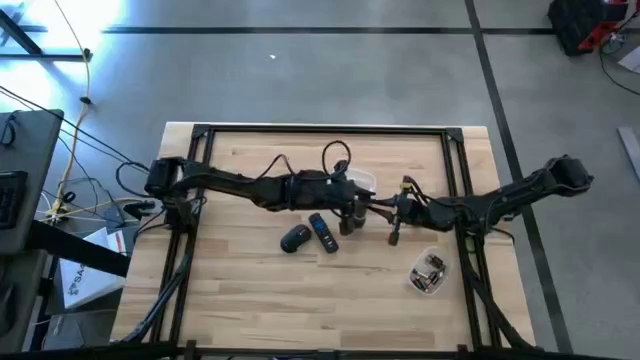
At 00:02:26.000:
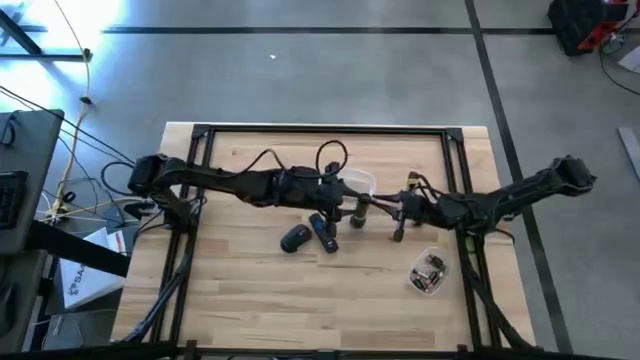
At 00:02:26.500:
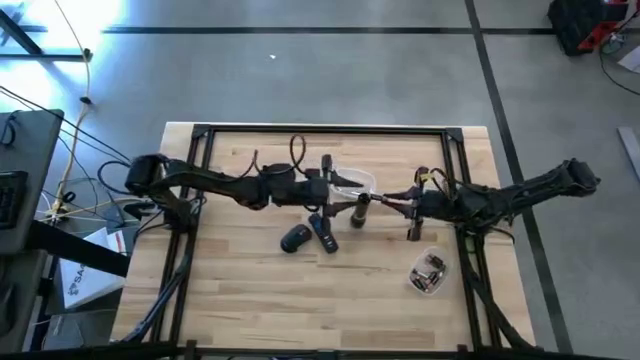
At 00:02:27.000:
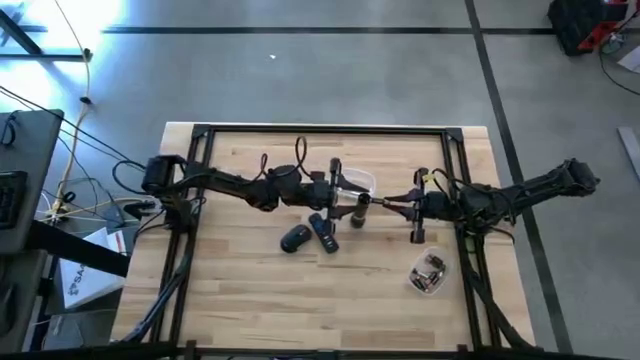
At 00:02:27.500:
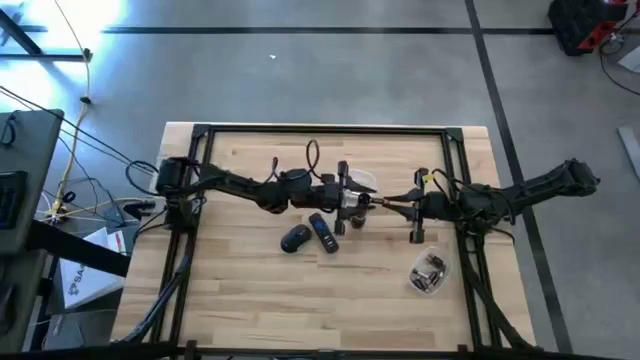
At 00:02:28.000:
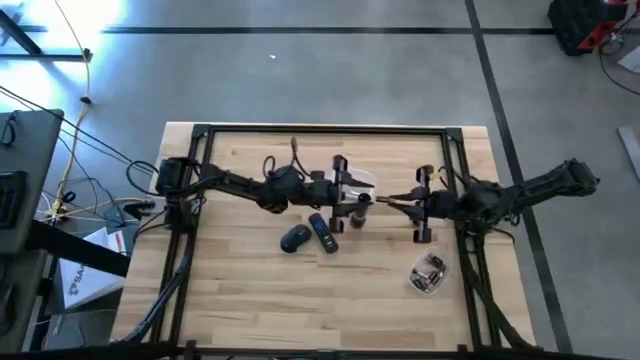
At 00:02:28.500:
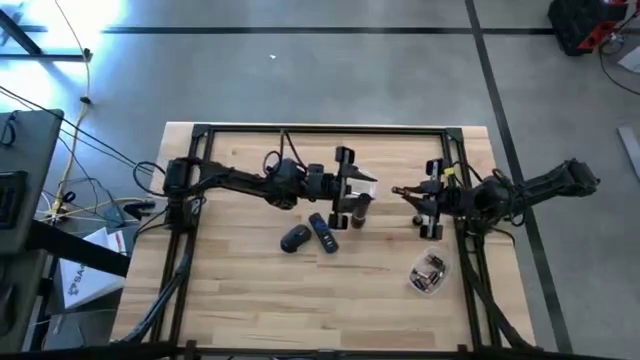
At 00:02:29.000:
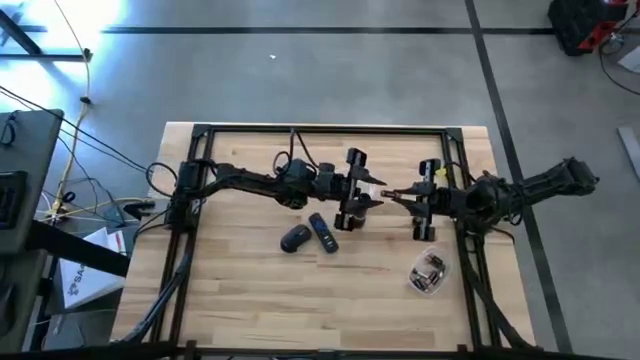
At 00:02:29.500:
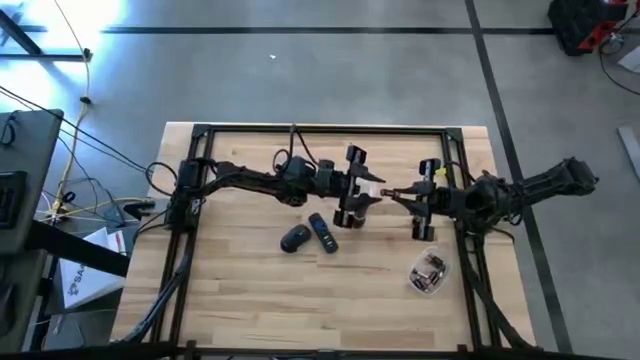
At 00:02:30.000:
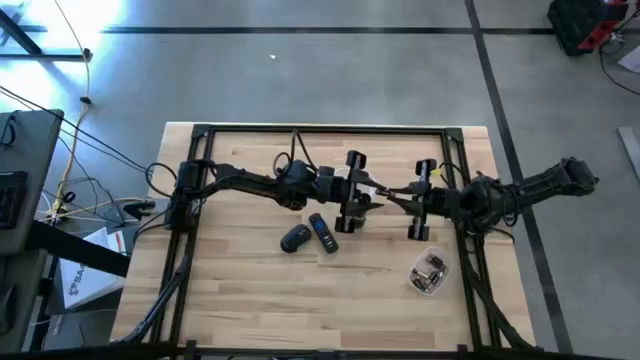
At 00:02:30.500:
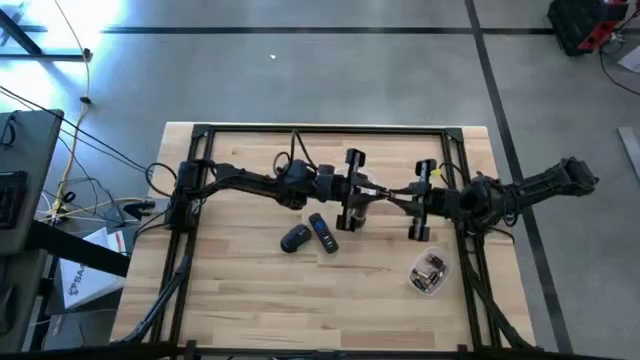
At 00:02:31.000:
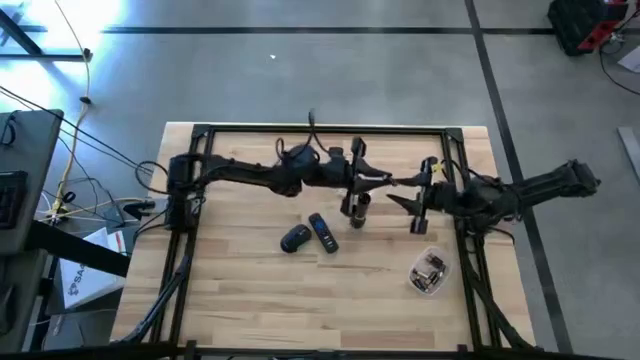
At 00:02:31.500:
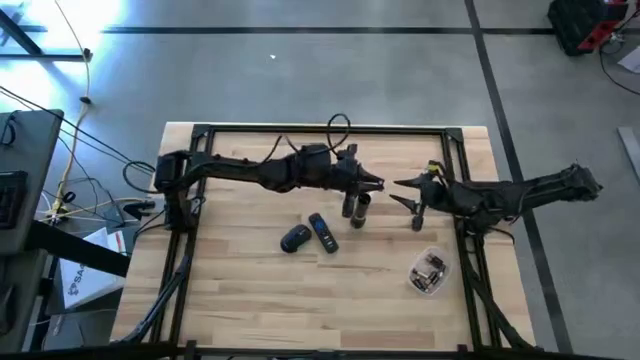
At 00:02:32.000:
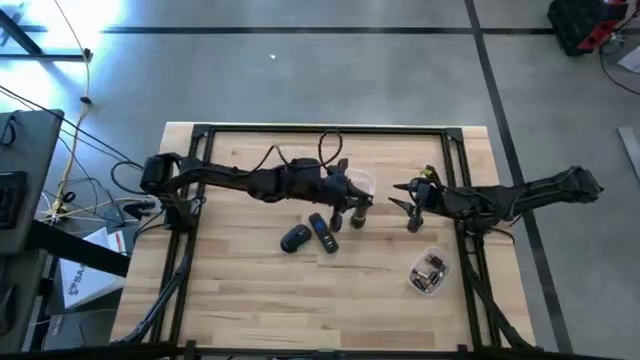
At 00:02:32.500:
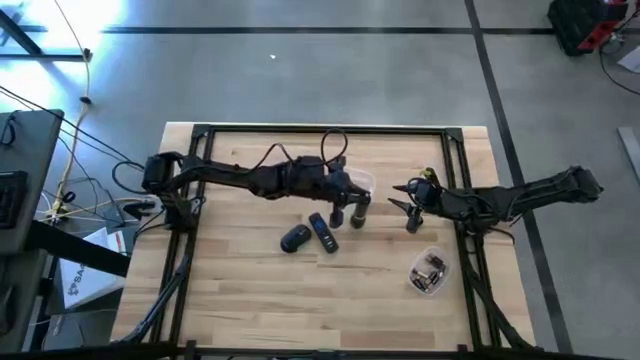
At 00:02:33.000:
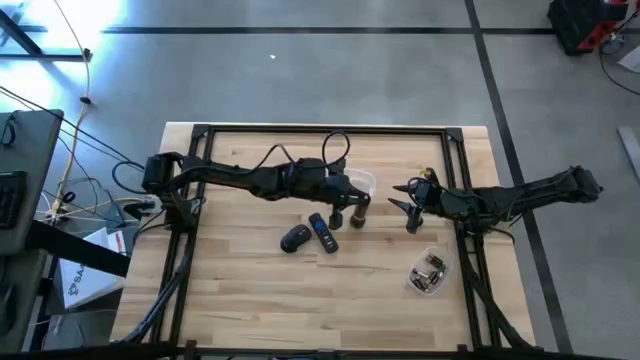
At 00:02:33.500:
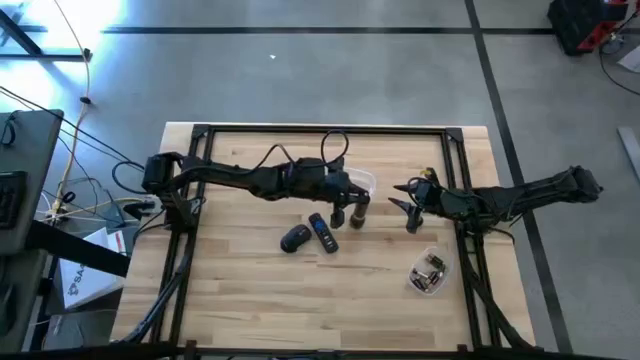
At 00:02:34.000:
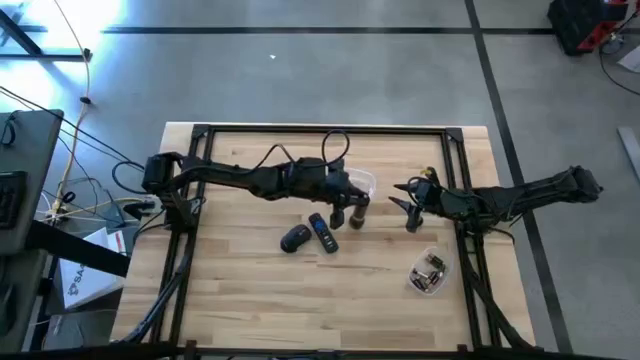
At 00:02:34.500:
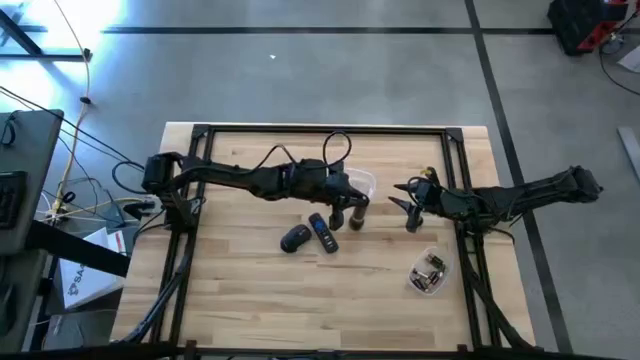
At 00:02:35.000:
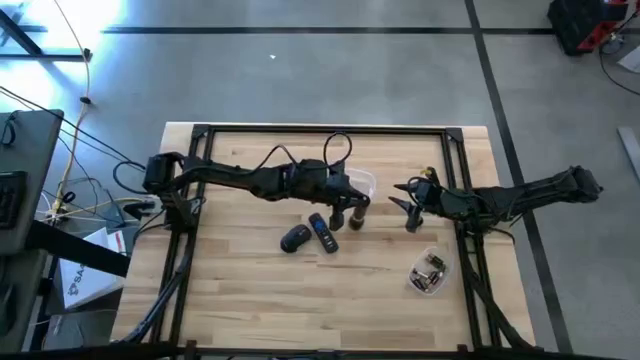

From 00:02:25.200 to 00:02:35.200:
Task: Insert battery
Insert the black battery into the flashlight

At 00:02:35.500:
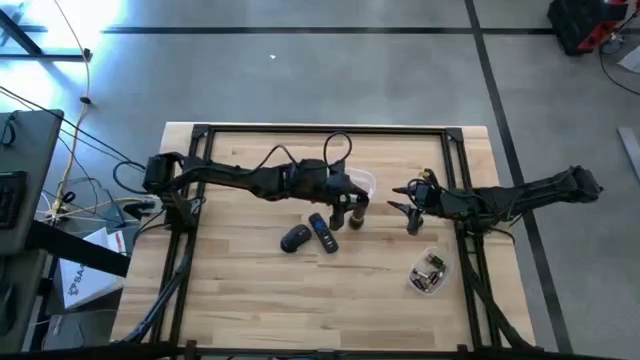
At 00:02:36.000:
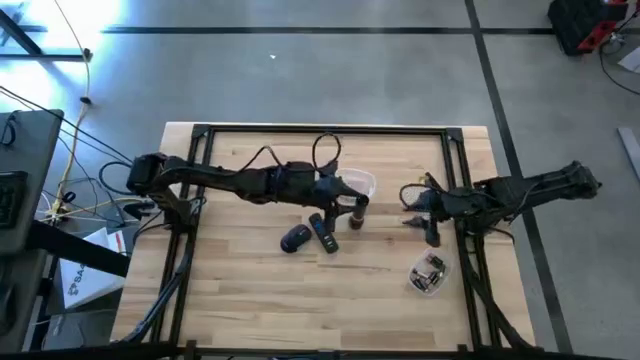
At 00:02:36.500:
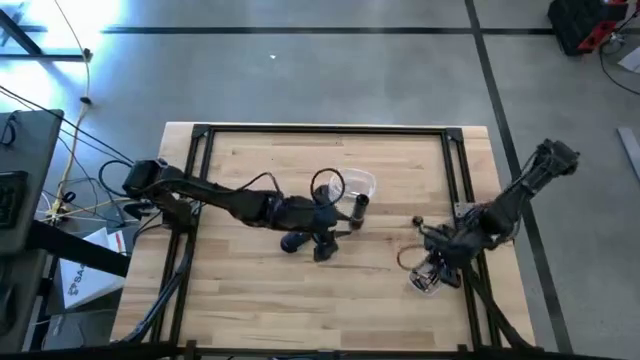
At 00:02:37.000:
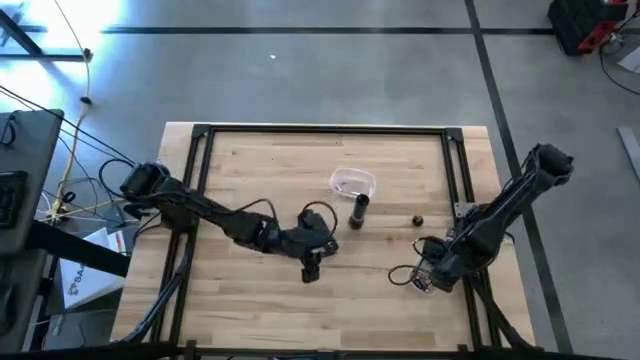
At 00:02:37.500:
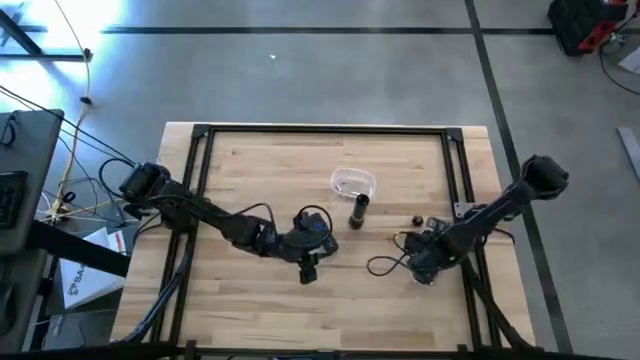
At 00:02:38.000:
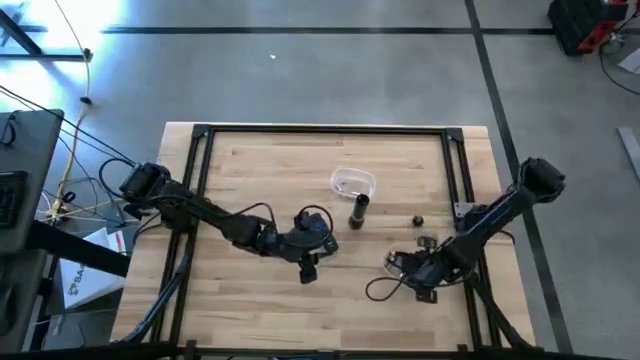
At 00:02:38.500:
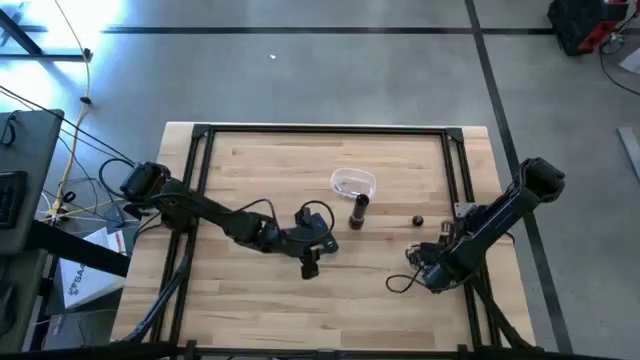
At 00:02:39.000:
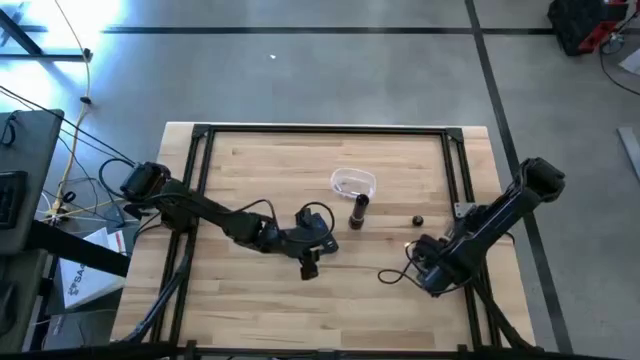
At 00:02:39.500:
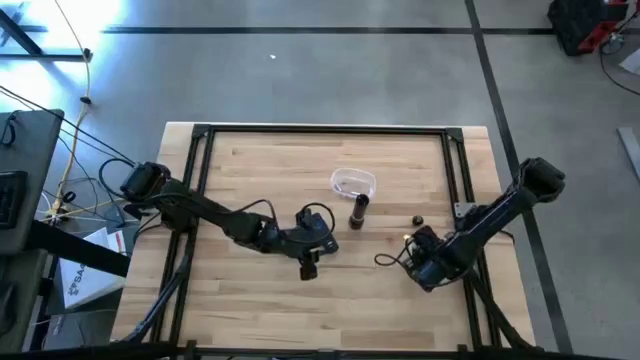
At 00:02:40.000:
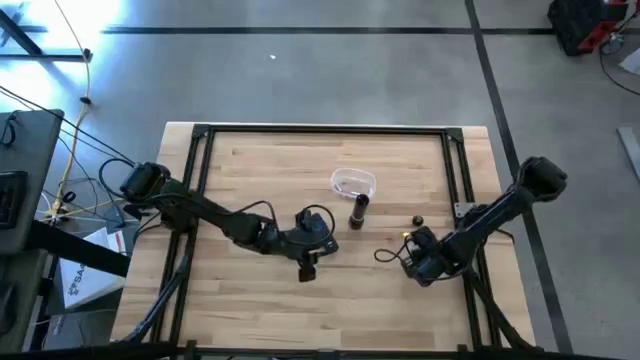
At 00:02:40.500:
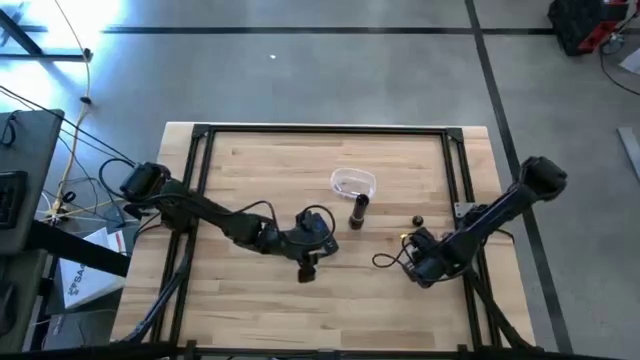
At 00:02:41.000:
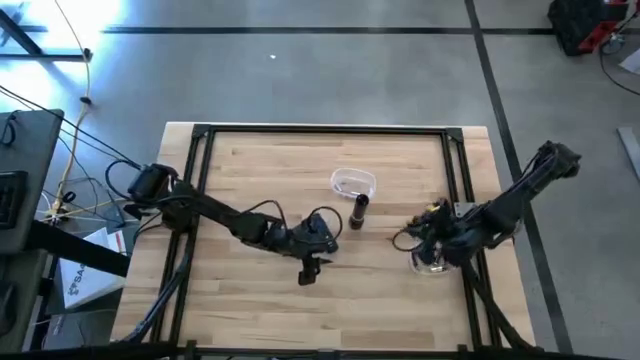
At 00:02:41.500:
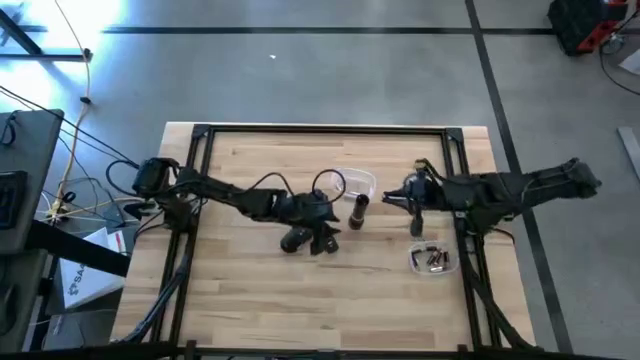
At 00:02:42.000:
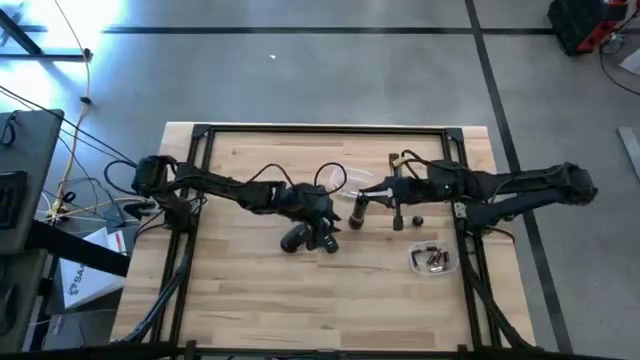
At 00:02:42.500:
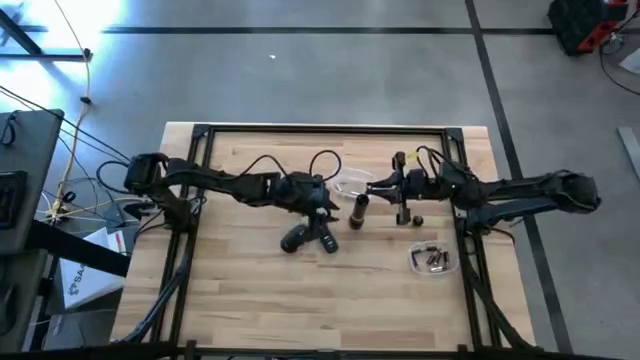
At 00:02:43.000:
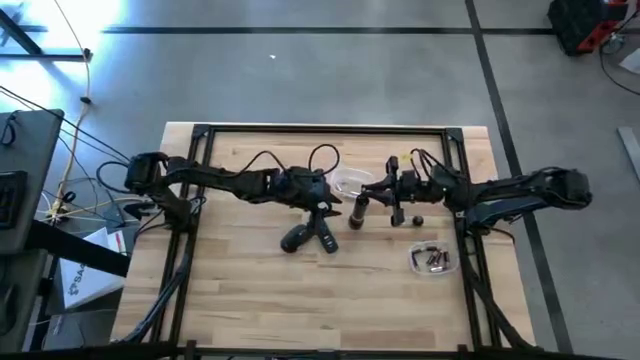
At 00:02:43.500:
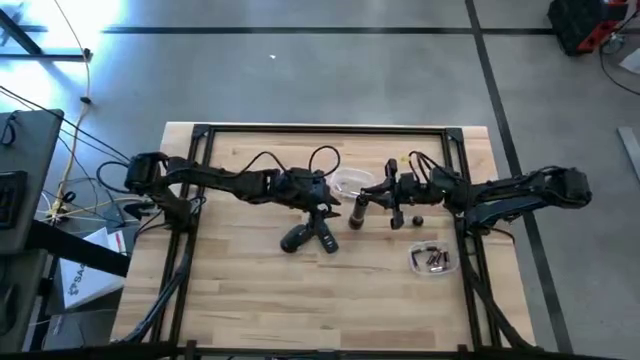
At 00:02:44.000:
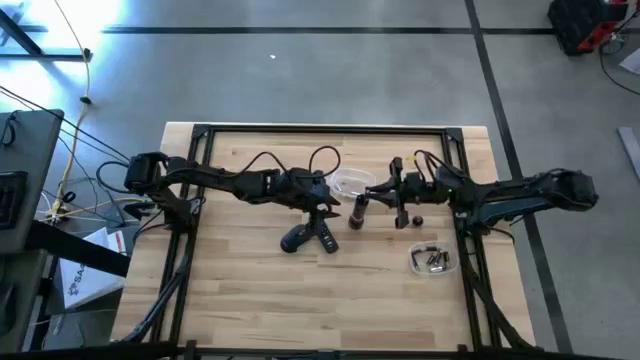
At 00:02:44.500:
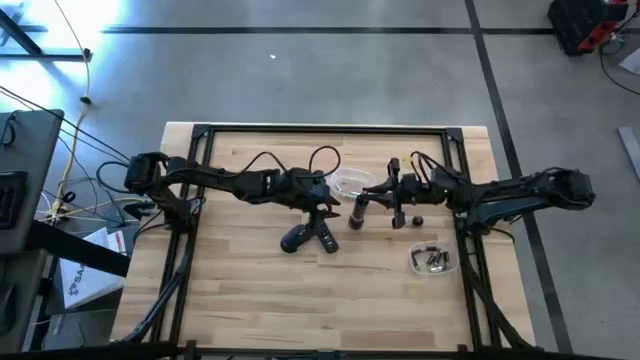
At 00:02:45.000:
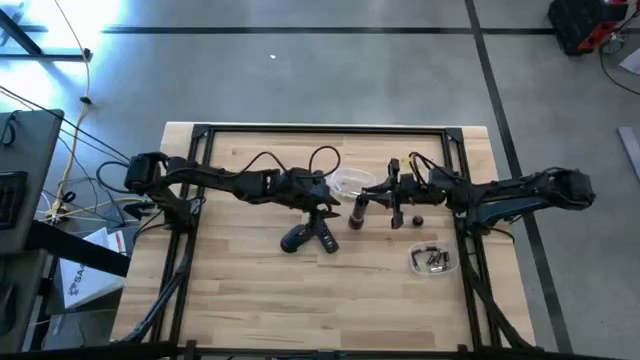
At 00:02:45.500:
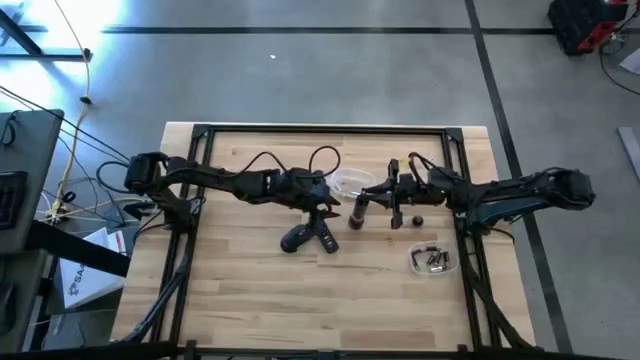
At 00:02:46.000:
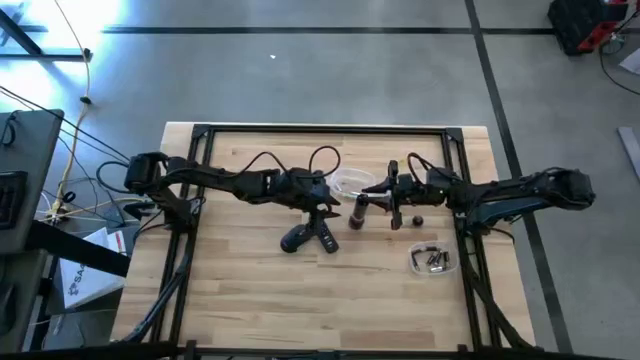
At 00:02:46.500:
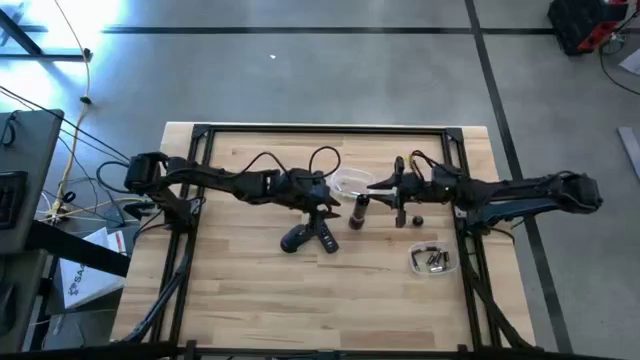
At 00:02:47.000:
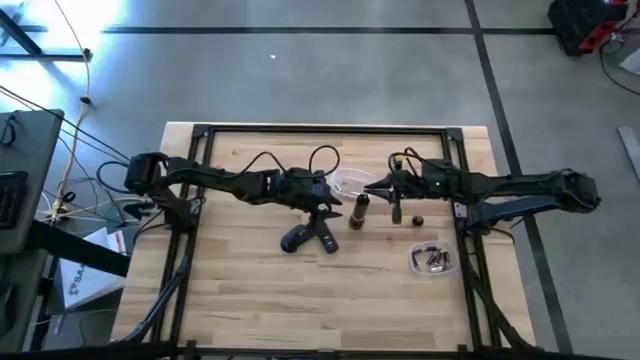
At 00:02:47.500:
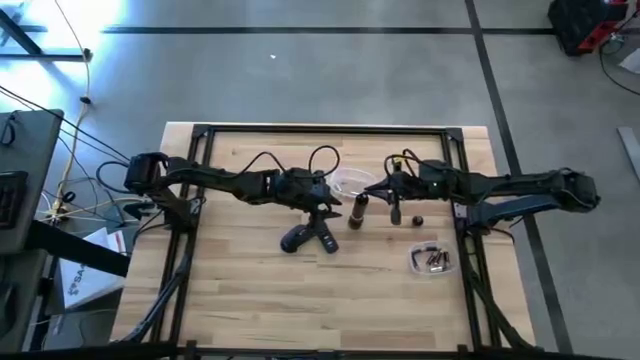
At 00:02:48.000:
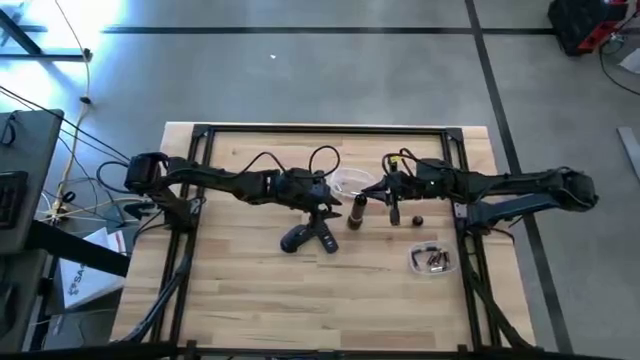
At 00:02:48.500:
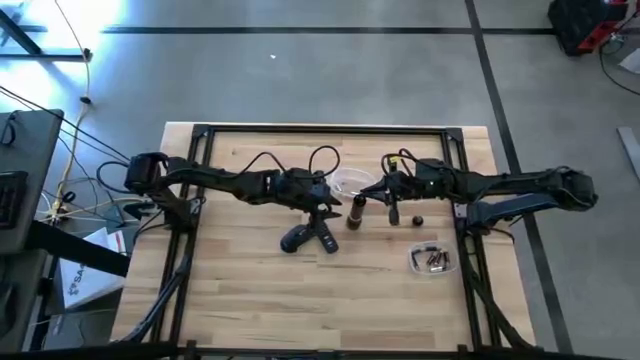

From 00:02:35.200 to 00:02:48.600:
Insert the black battery into the flashlight
